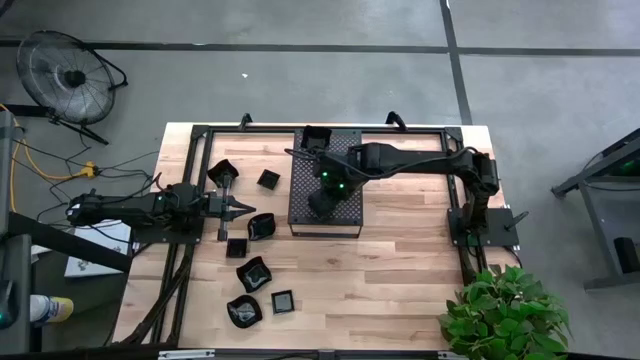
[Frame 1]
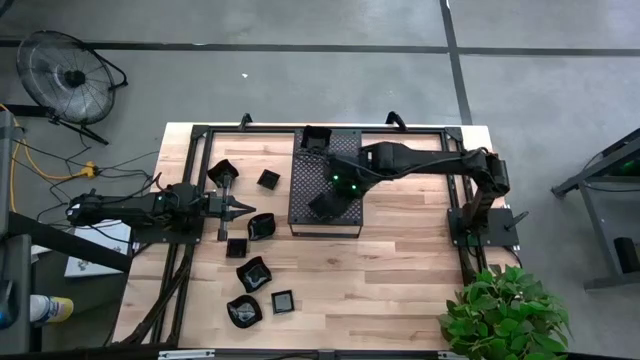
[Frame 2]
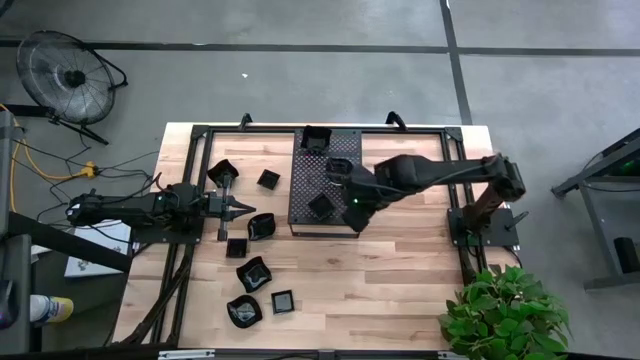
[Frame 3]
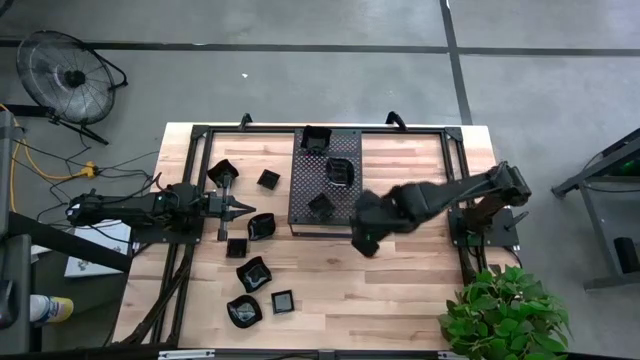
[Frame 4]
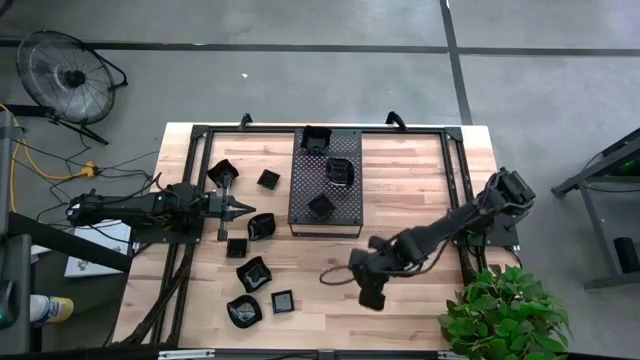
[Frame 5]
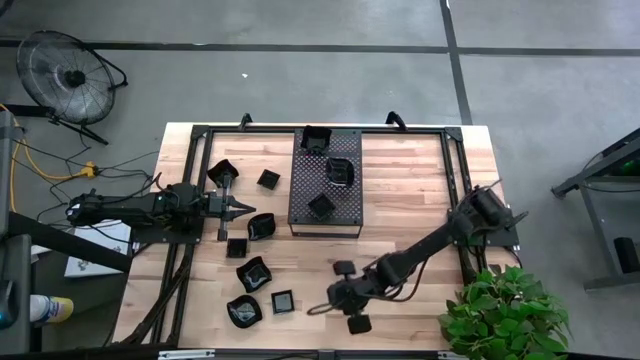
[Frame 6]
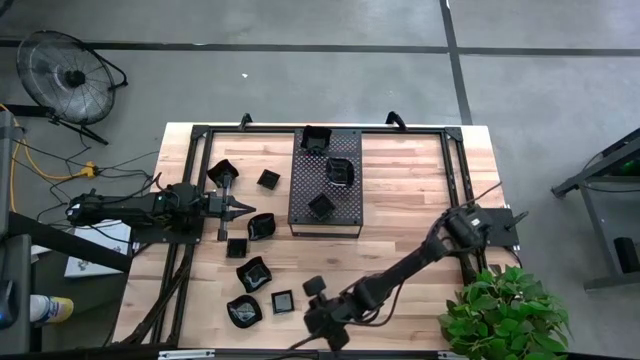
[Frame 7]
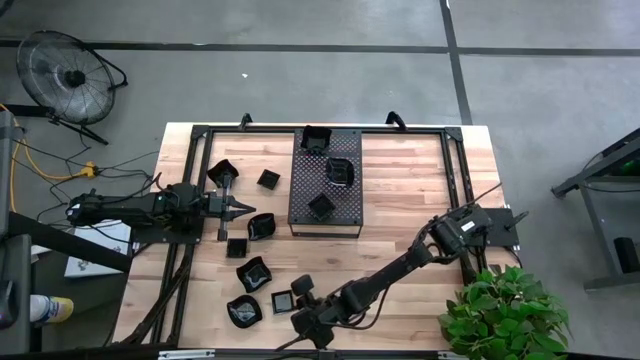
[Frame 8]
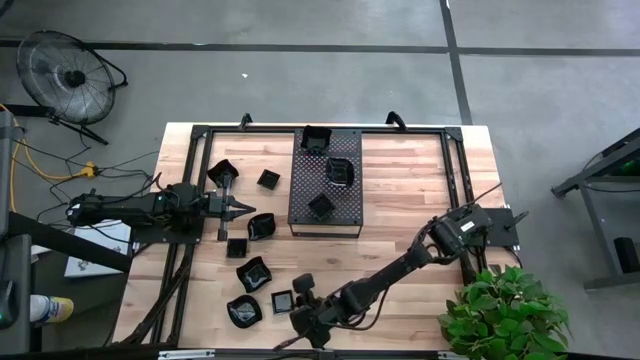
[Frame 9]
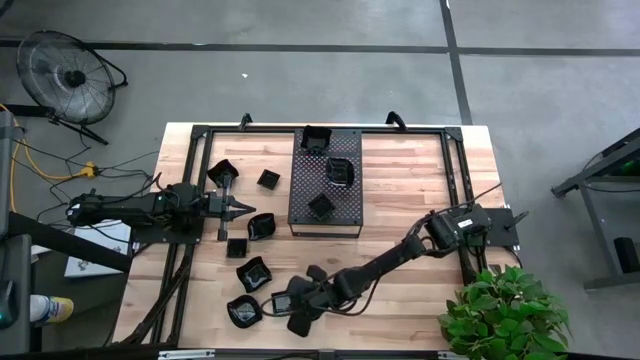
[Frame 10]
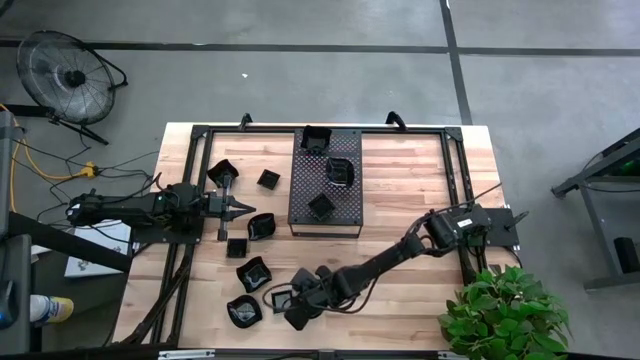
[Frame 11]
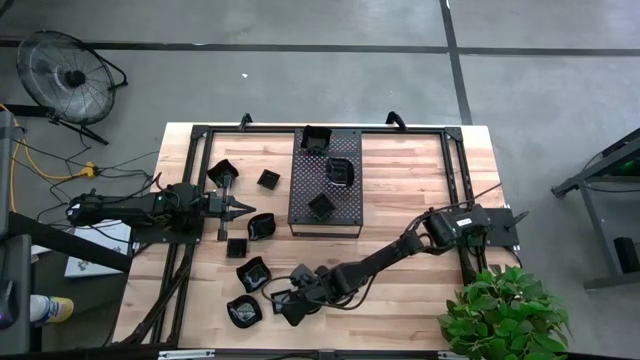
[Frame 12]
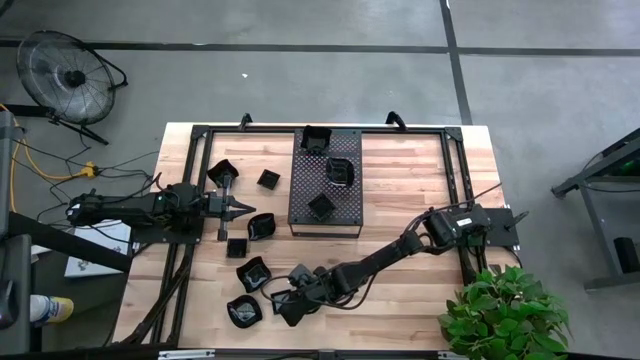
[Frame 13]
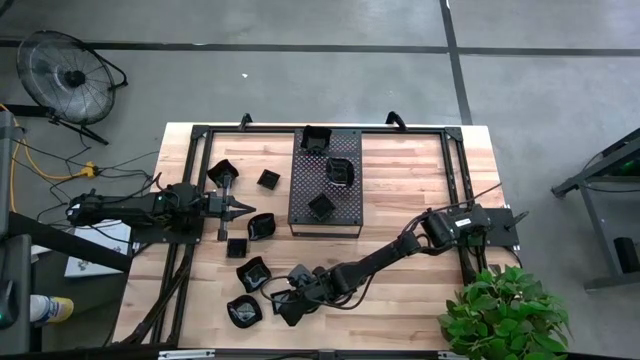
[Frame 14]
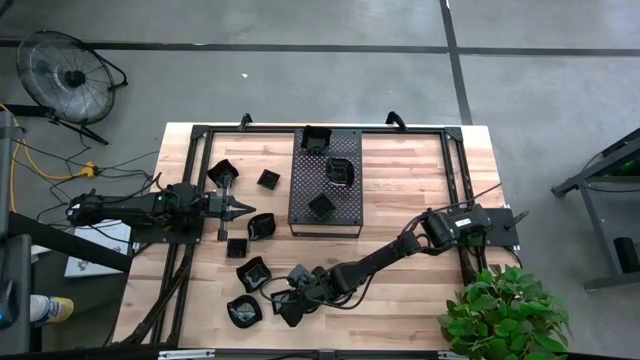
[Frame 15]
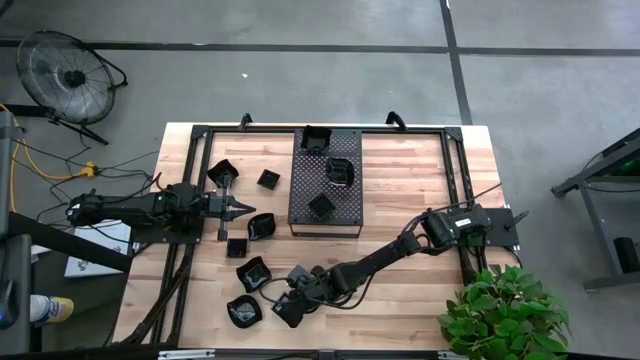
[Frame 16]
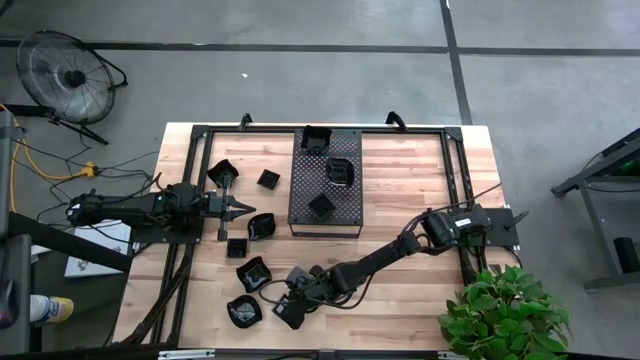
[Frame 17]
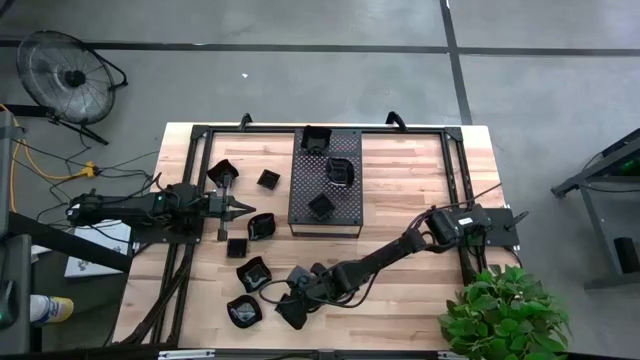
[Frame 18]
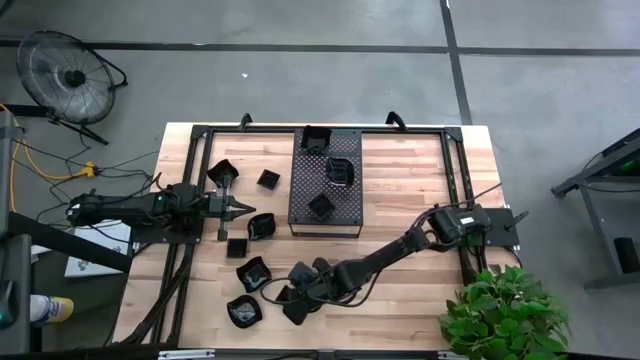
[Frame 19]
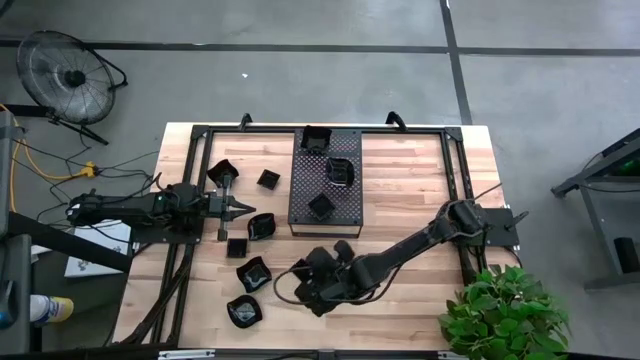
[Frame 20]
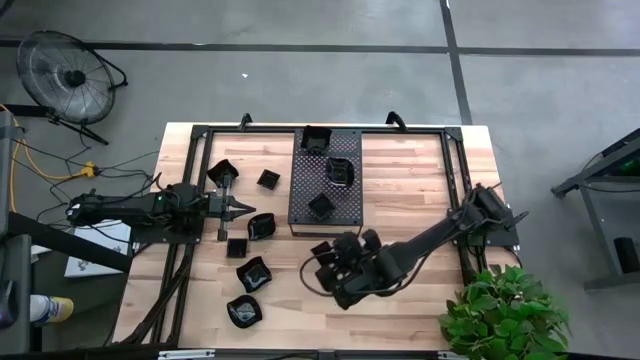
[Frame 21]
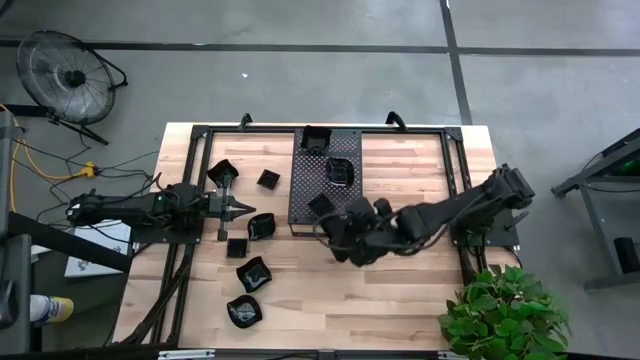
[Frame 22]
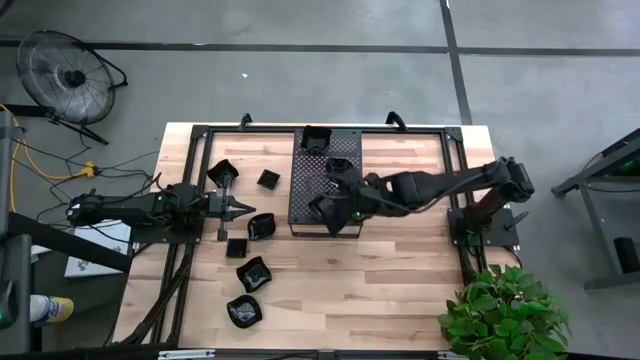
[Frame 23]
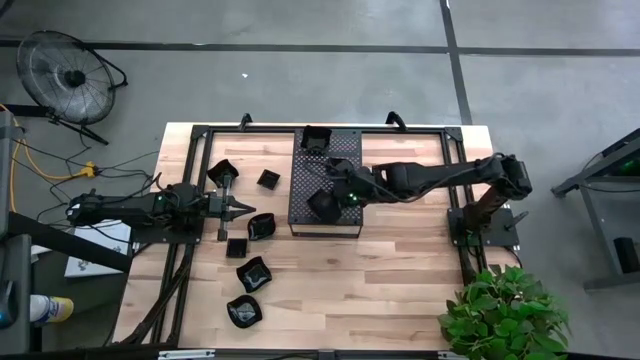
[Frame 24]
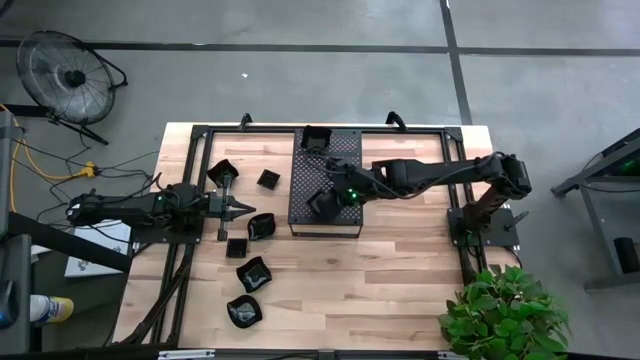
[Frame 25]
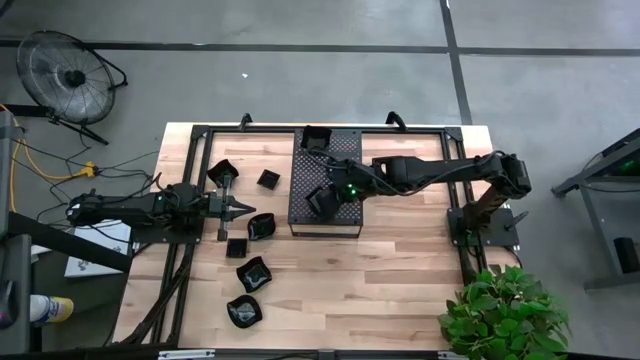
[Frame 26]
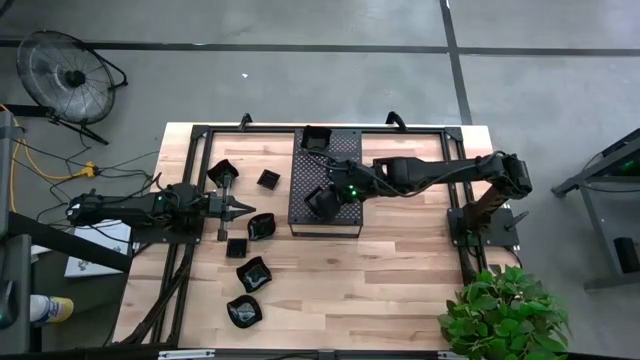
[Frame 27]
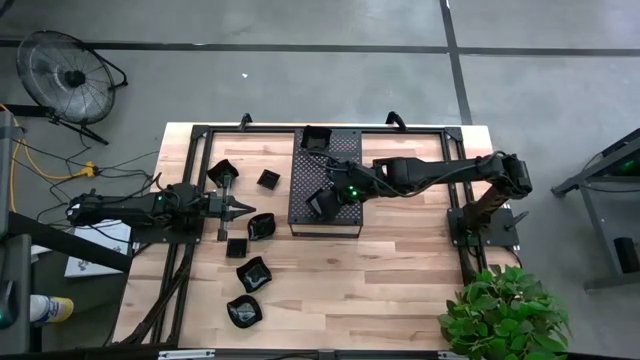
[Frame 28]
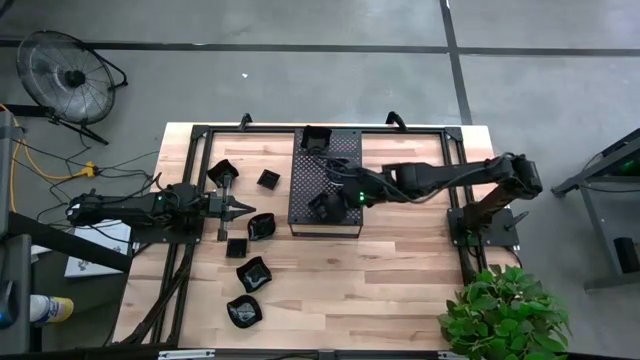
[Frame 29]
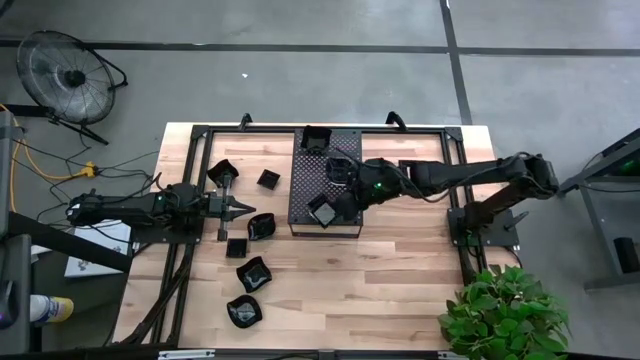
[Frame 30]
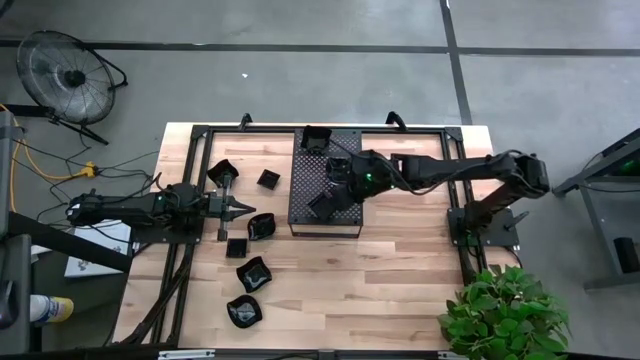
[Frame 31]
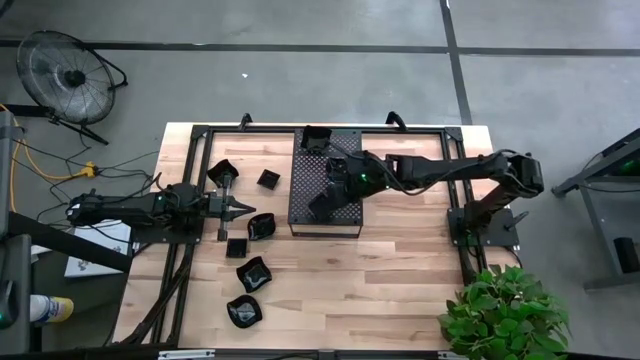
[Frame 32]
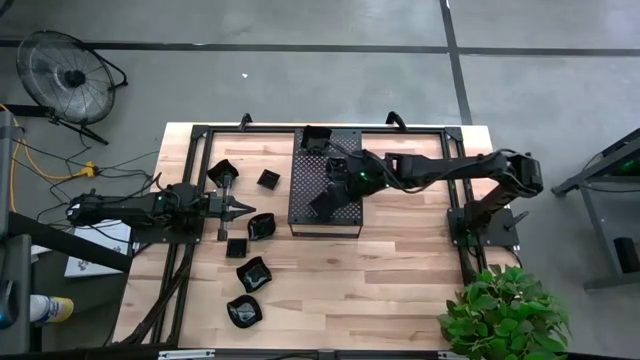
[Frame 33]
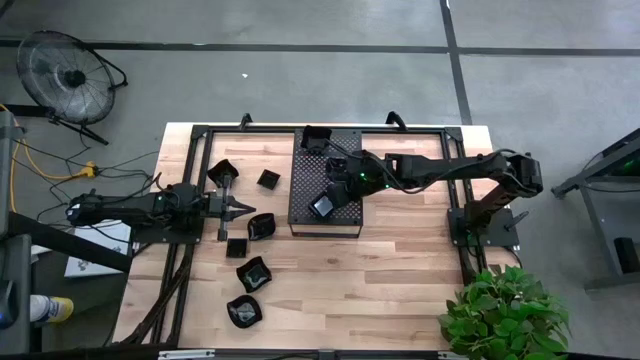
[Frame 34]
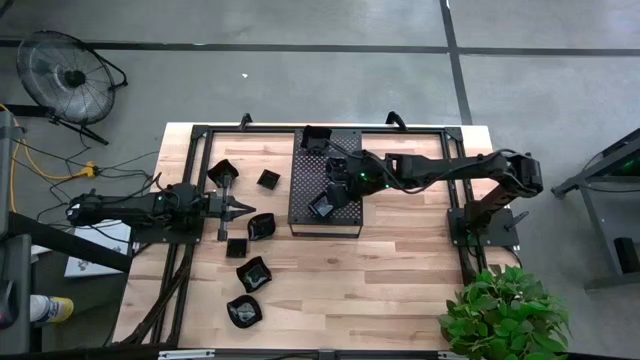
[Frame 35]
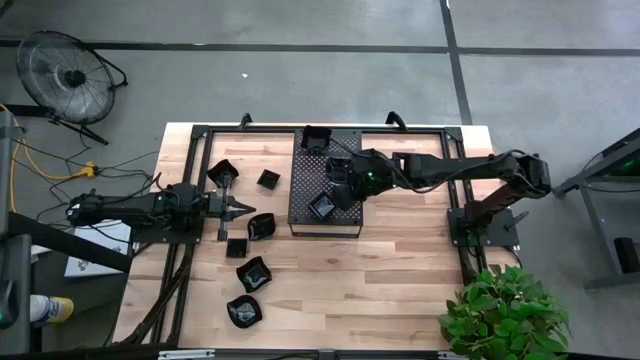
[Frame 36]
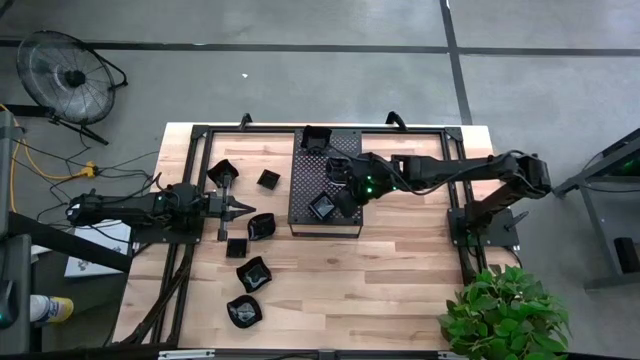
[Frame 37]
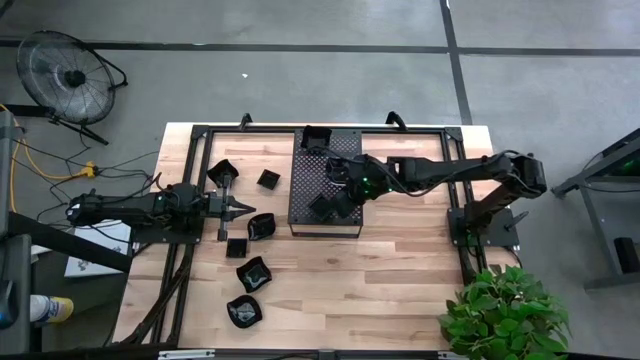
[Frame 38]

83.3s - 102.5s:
Task: Pick & Place Mini shaped plates
Stack the black square shape plate on top of the other black square shape plate on the shelf

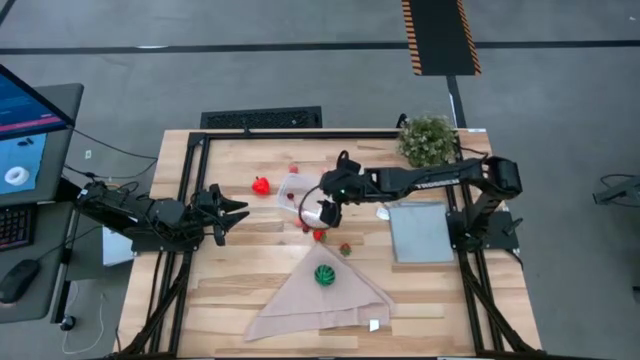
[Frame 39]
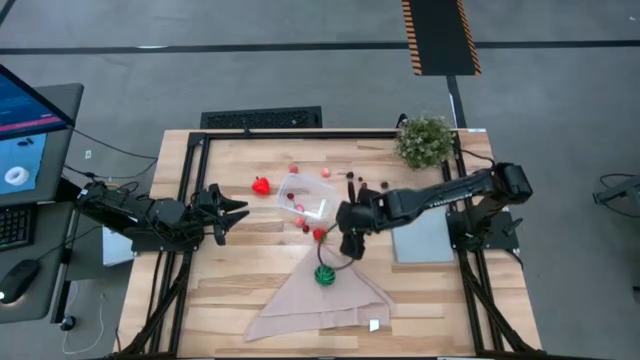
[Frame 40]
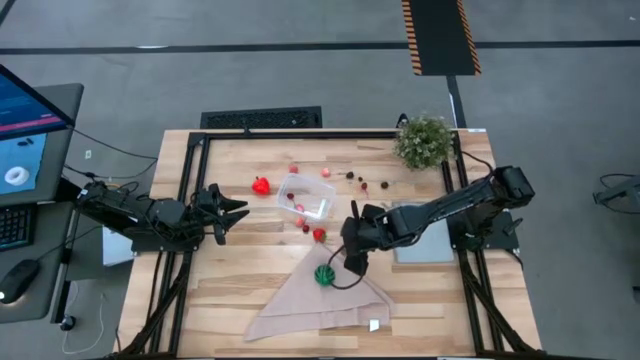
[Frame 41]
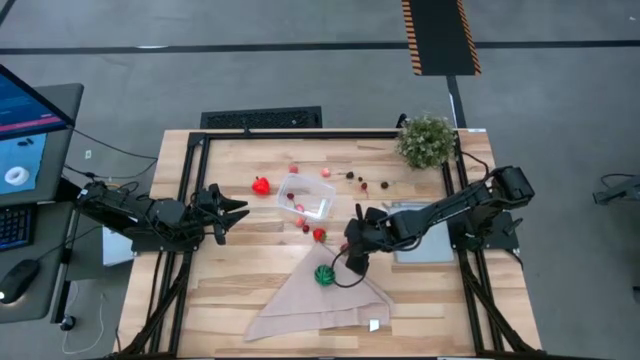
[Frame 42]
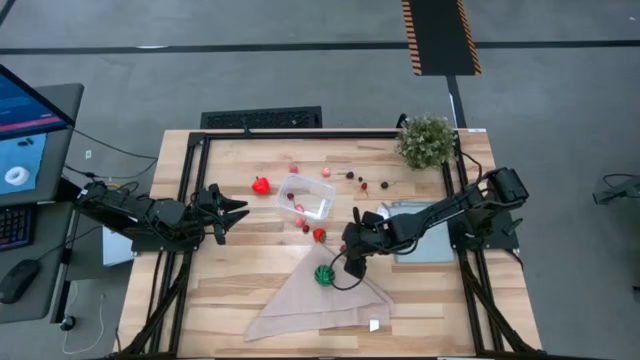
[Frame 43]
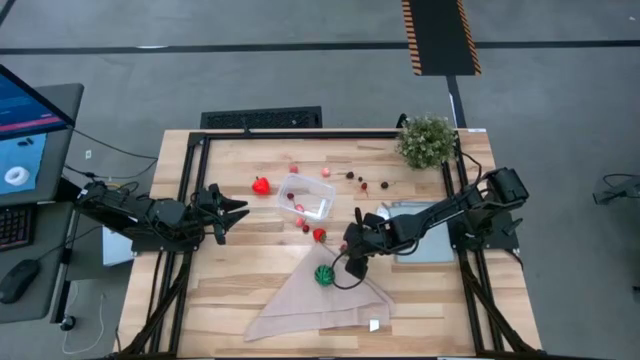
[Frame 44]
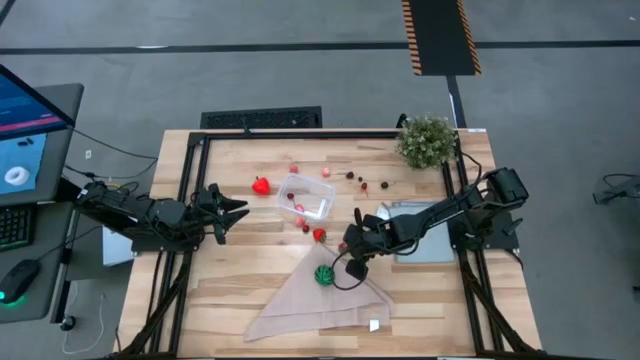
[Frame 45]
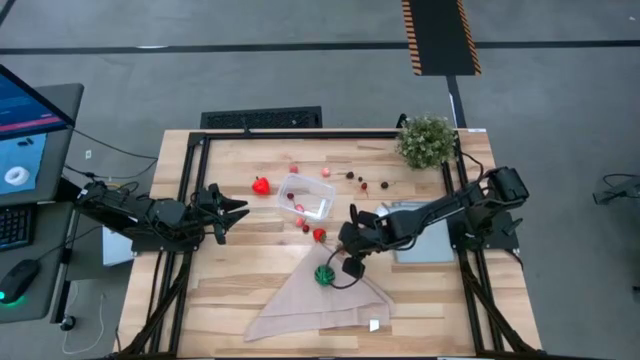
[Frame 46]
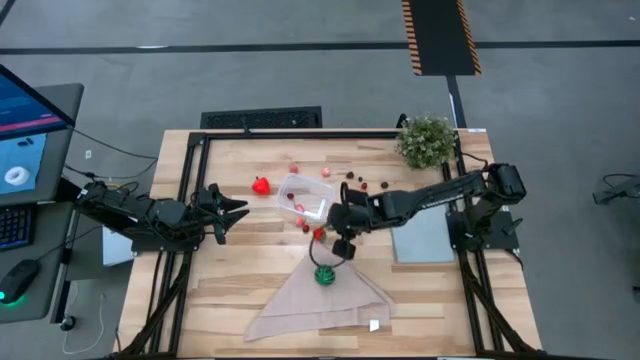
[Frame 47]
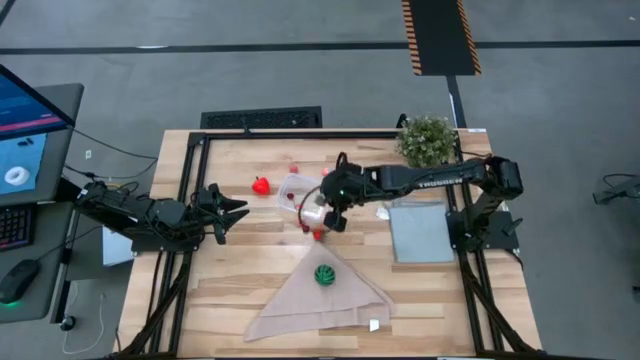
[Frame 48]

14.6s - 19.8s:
Task: Pick and placing Produce into tupperware
Put the right strawberry into the transparent bin
